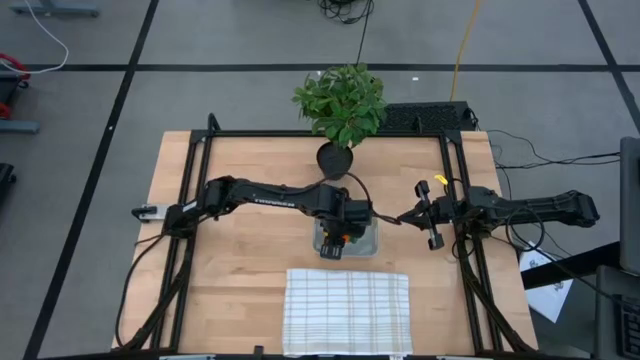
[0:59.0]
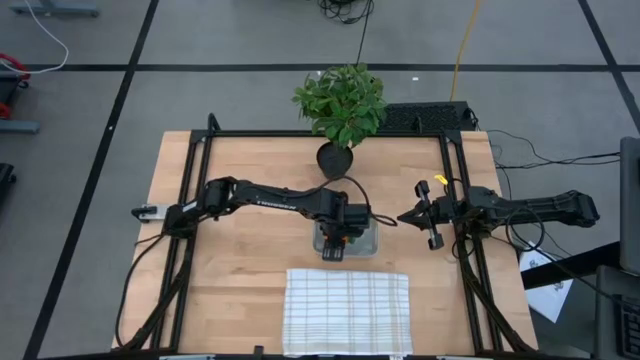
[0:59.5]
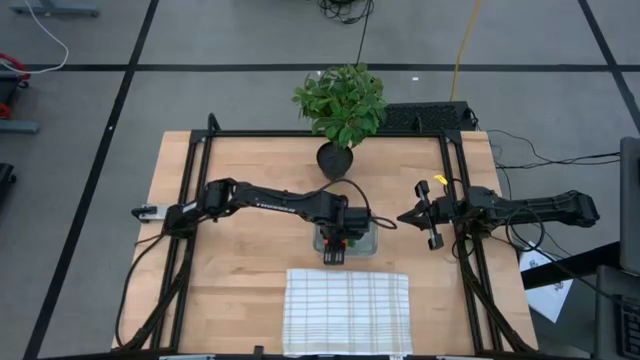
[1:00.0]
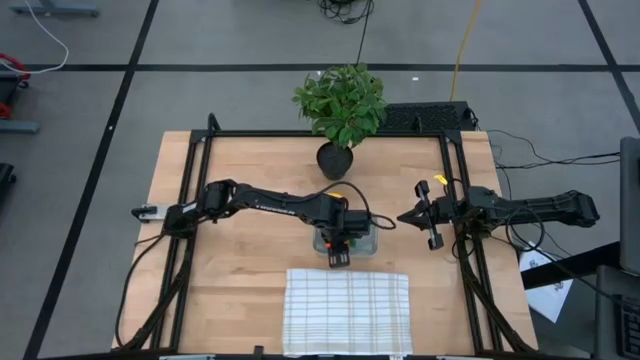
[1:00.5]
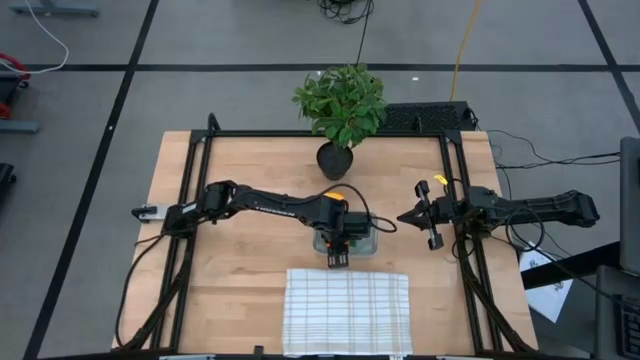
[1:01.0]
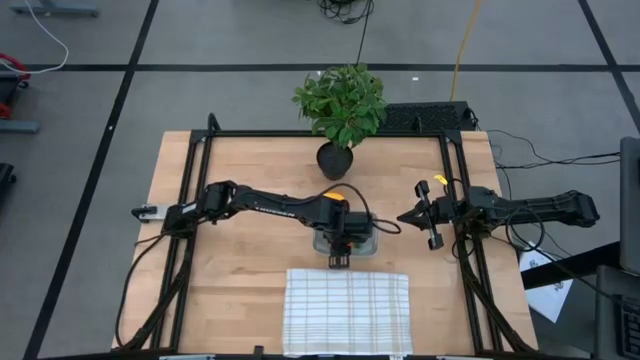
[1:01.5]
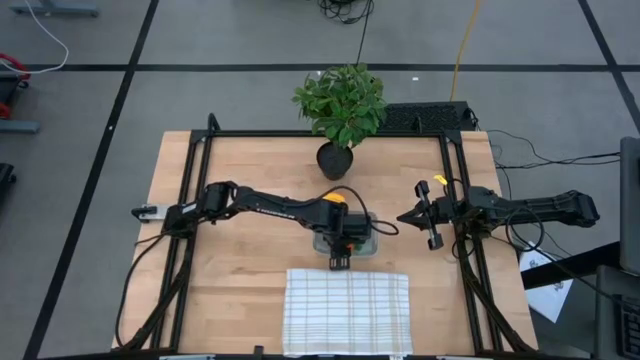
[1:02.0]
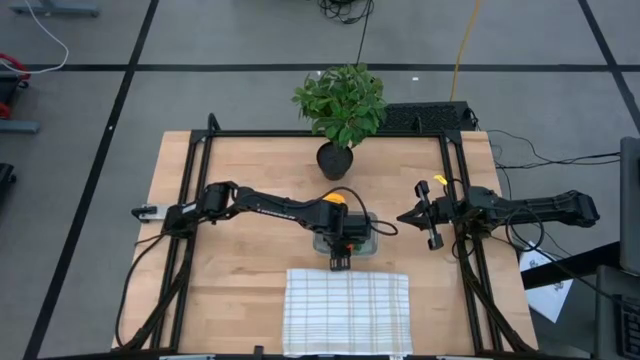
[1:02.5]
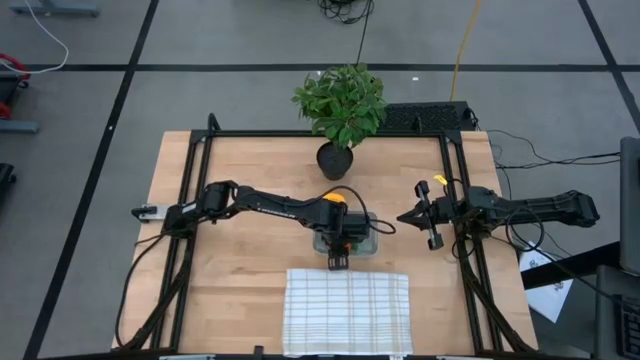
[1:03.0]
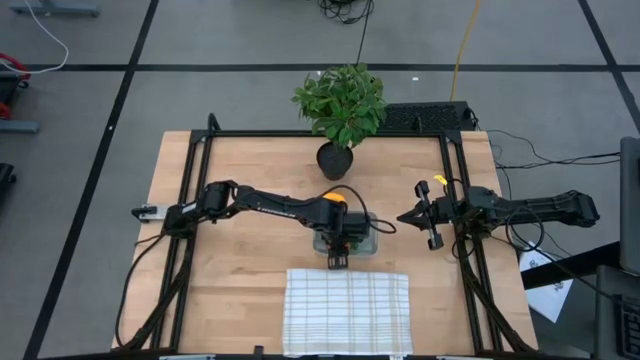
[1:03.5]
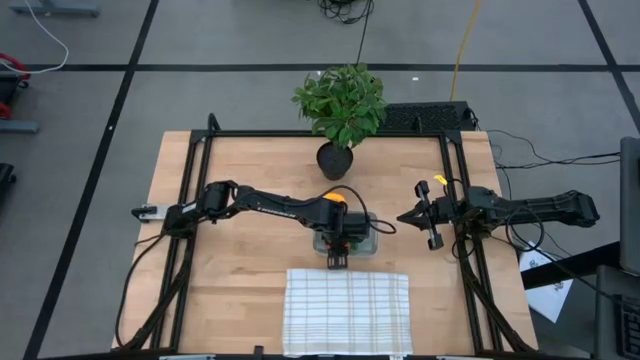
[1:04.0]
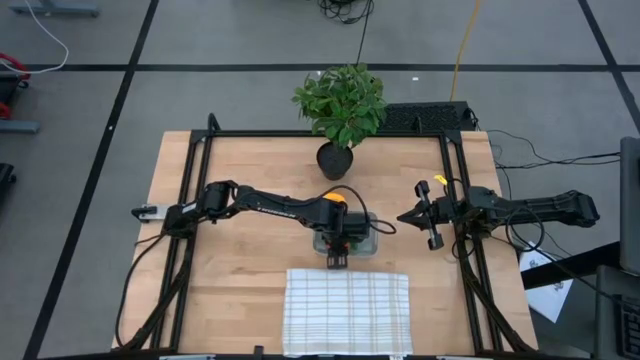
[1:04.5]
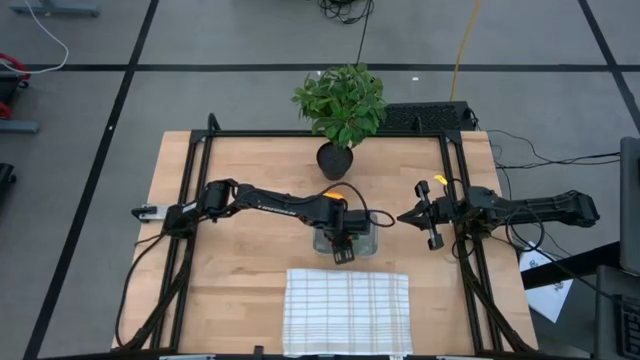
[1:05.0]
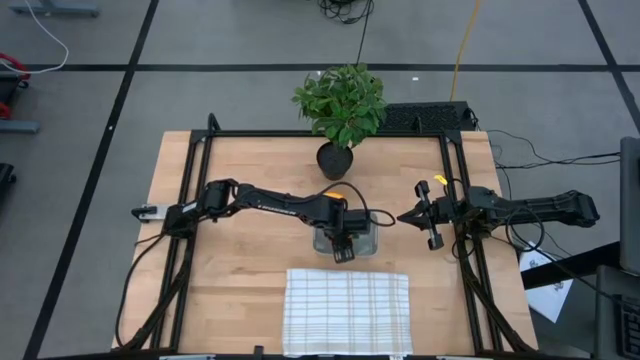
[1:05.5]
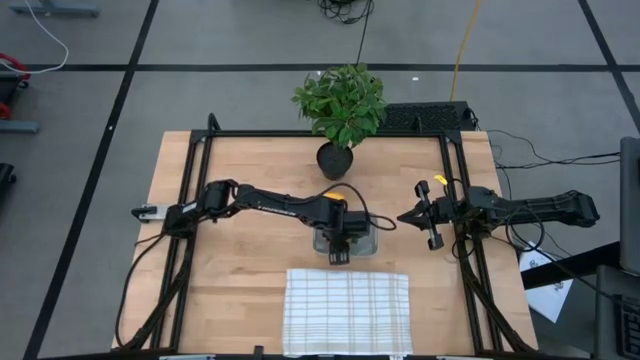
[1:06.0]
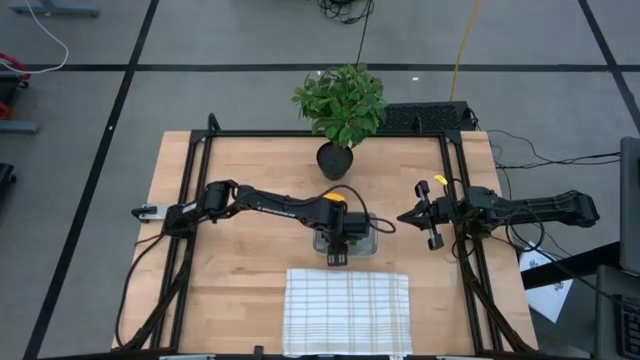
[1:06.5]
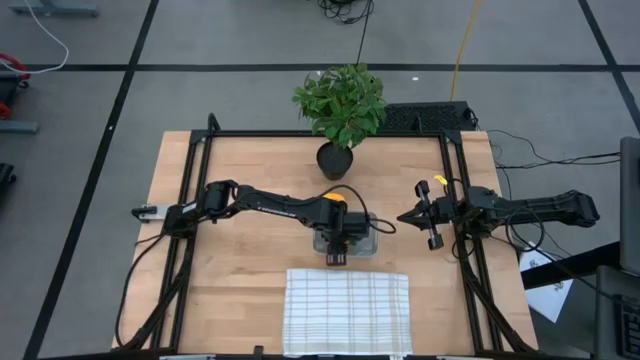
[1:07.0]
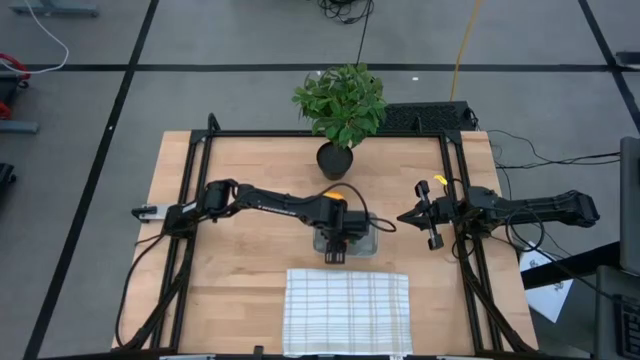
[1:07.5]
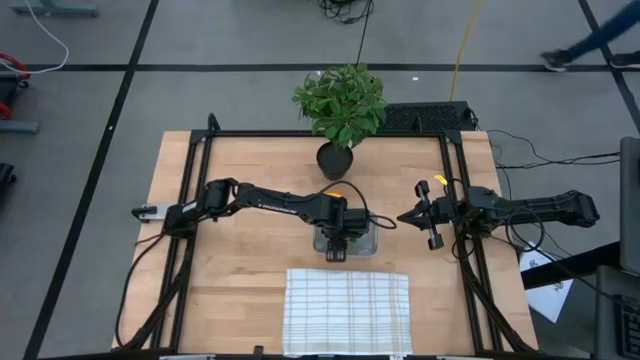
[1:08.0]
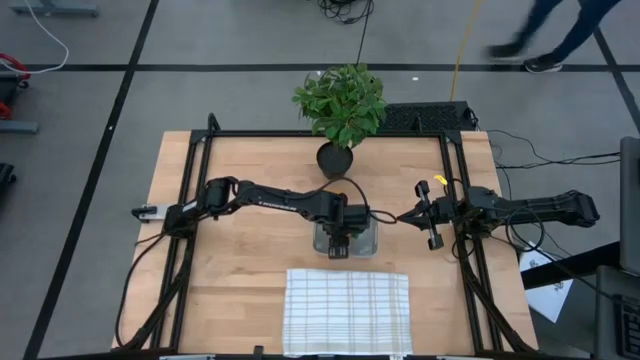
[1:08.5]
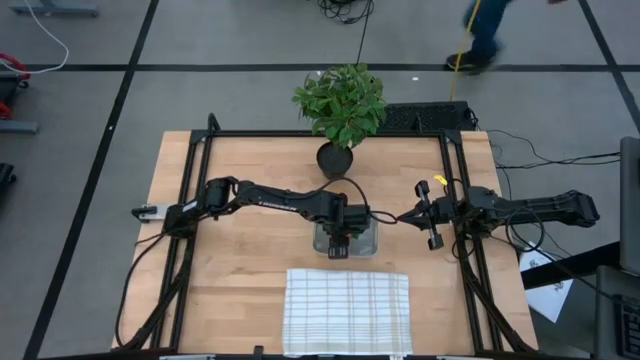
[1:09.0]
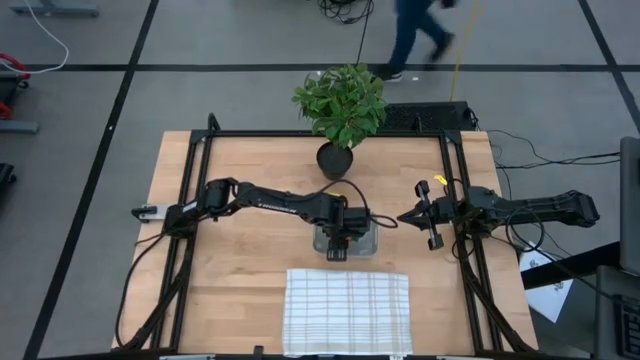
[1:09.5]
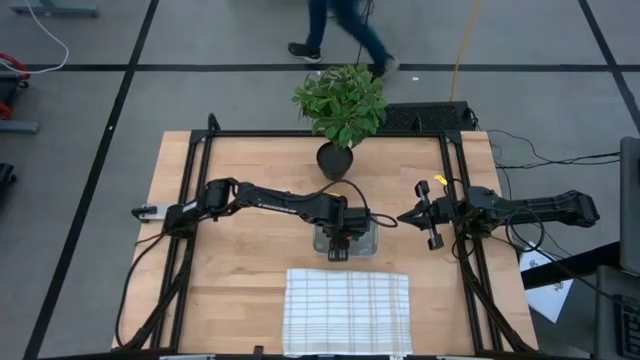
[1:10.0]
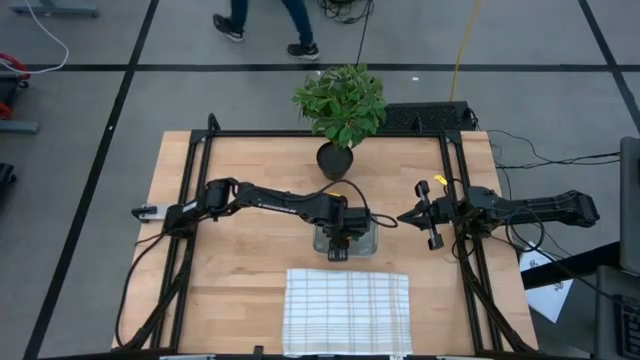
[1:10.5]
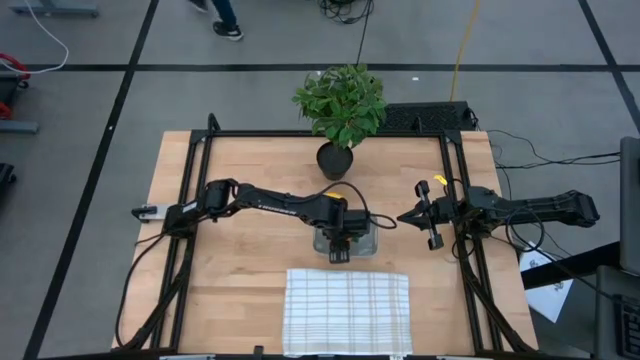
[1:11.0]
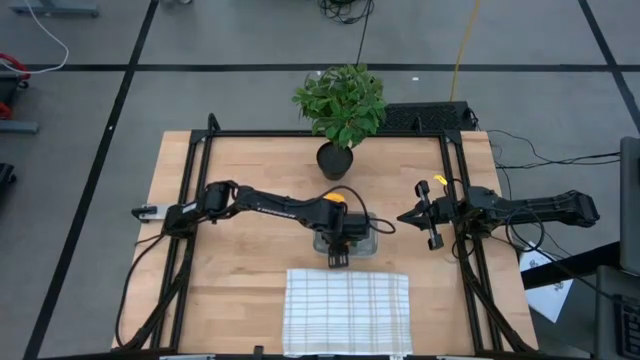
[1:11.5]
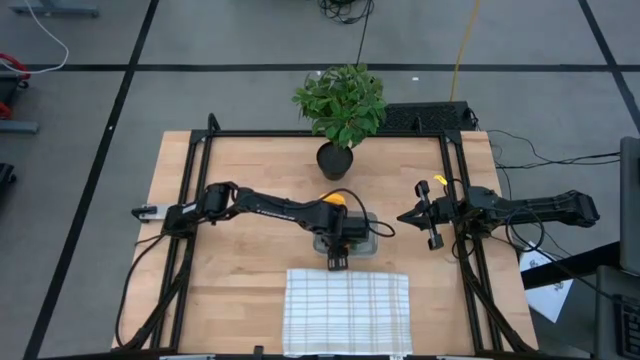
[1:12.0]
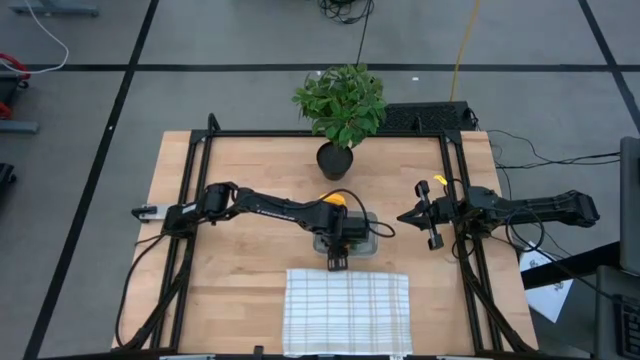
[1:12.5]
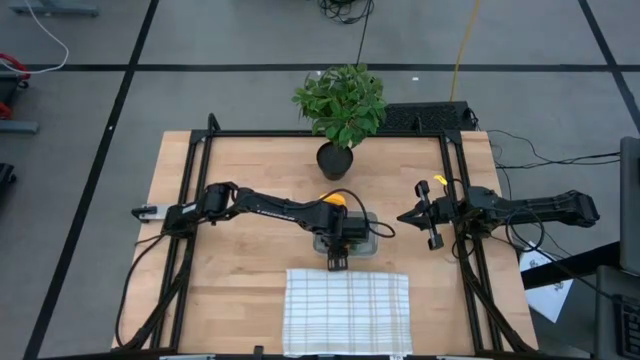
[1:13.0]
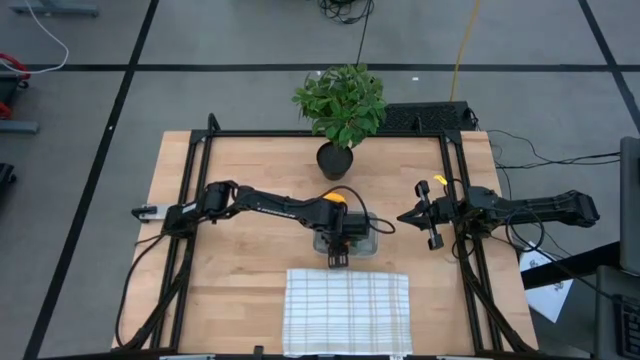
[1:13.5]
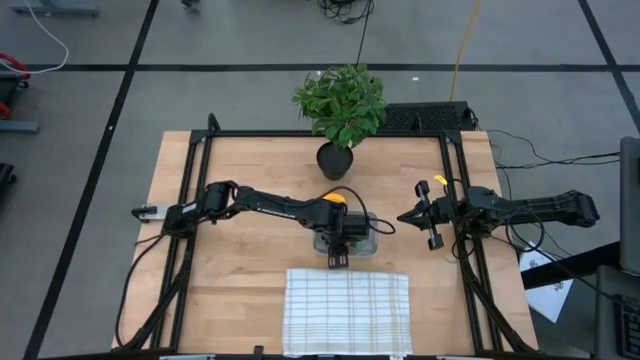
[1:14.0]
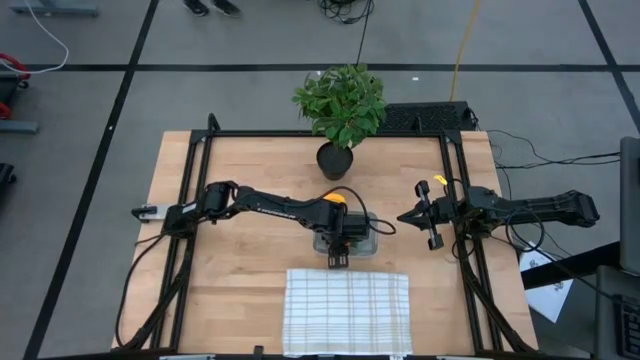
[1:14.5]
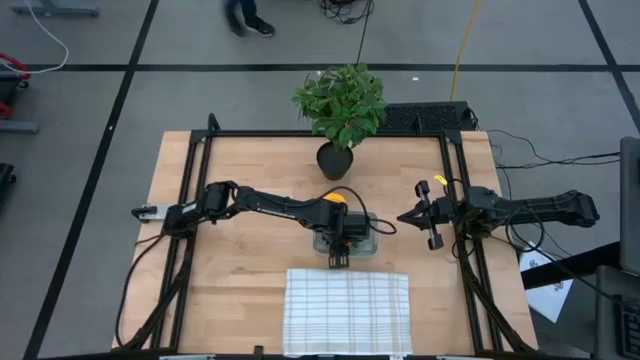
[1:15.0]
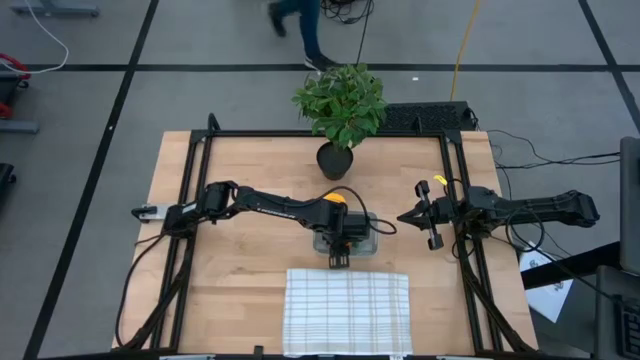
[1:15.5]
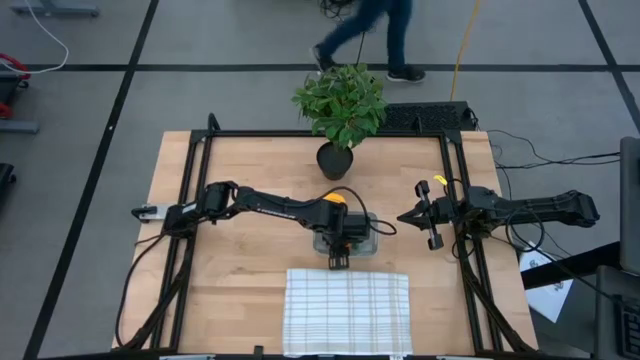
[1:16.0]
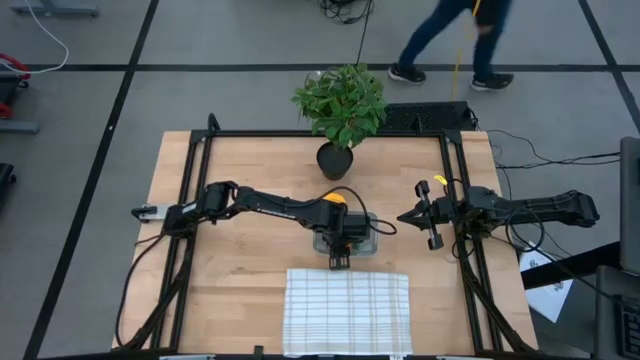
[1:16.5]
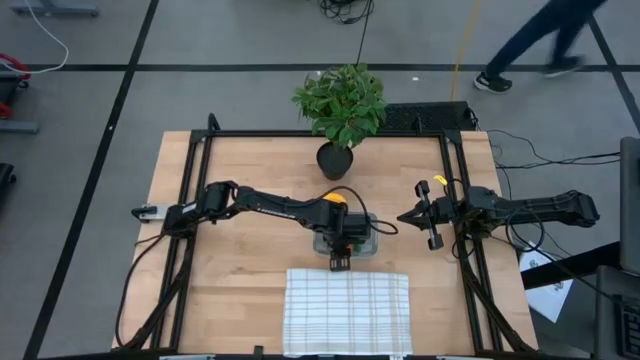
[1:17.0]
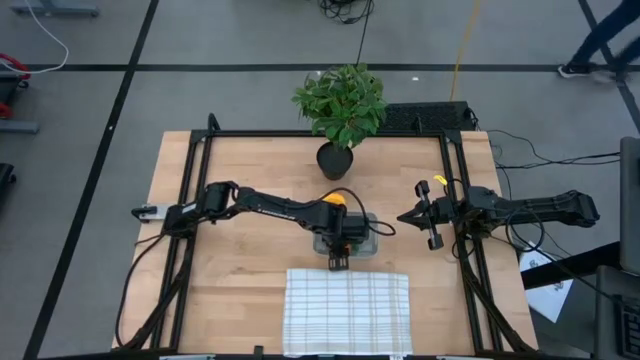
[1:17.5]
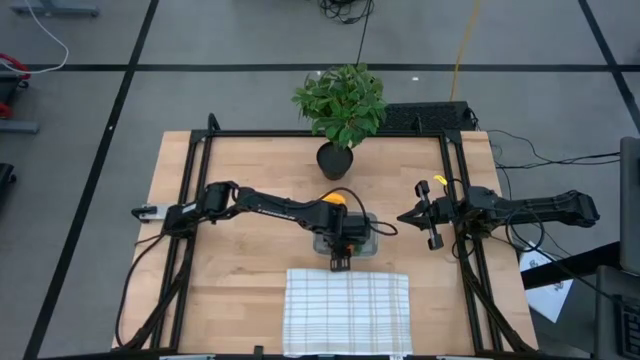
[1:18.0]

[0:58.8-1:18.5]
Task: Pick and placing Produce into tupperware
Put the orange carrot into the gray bin
